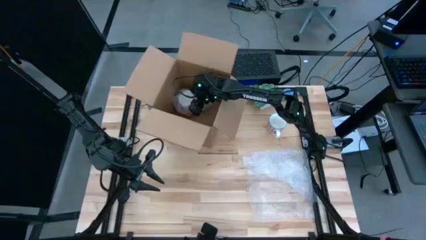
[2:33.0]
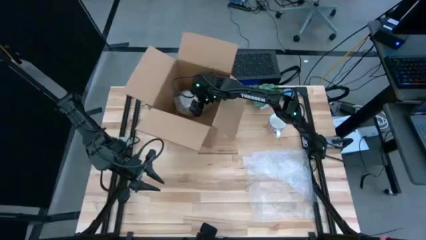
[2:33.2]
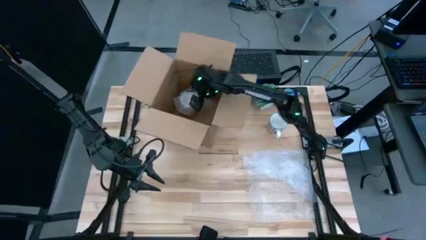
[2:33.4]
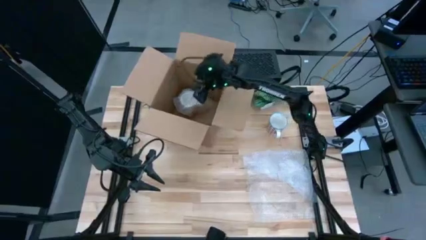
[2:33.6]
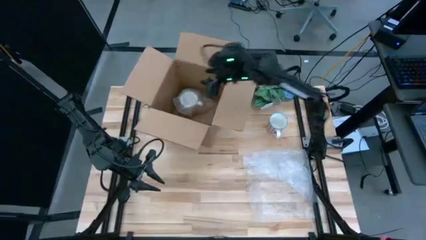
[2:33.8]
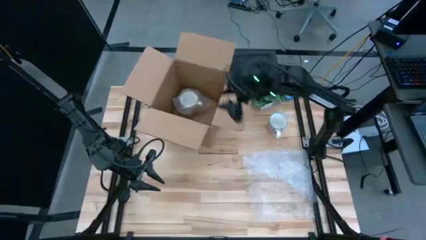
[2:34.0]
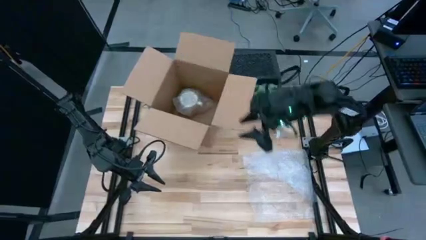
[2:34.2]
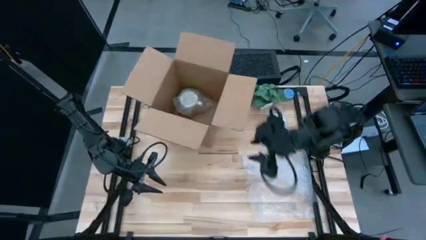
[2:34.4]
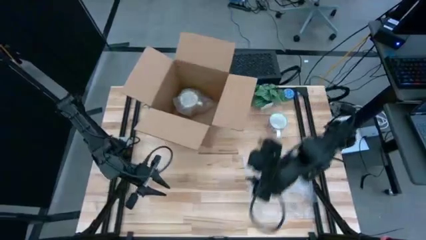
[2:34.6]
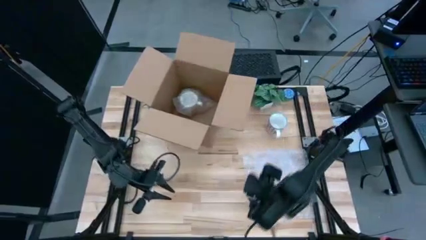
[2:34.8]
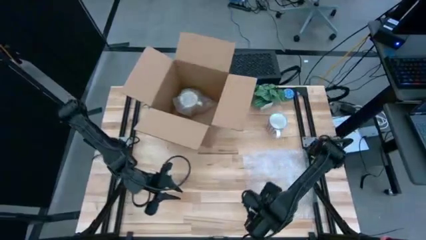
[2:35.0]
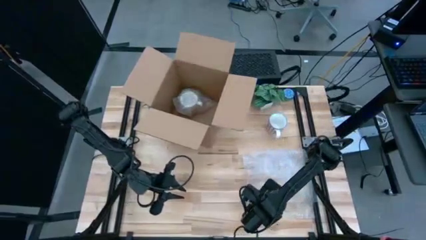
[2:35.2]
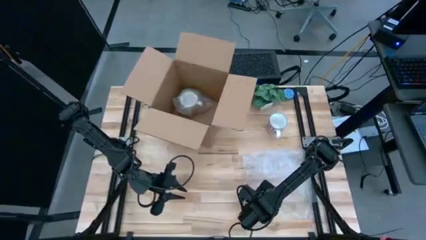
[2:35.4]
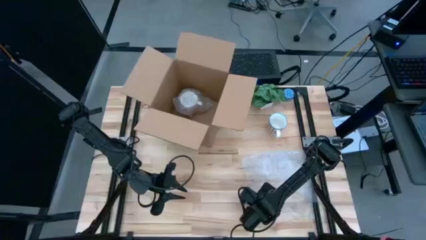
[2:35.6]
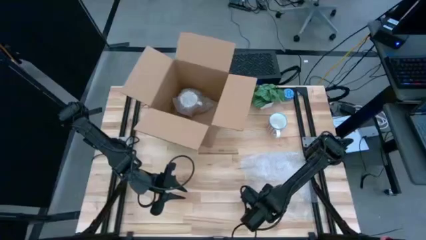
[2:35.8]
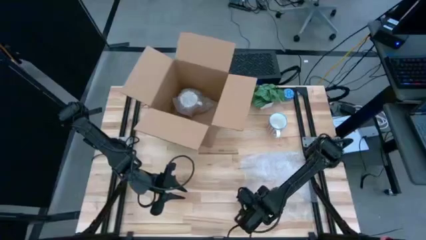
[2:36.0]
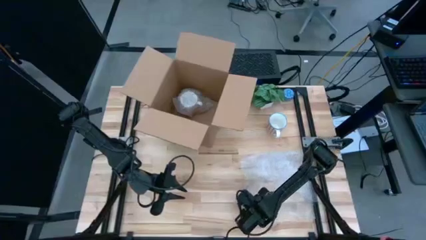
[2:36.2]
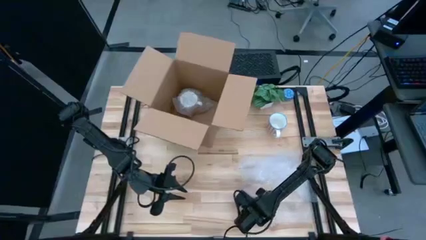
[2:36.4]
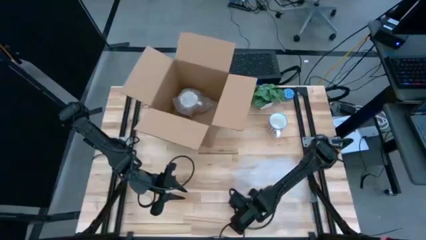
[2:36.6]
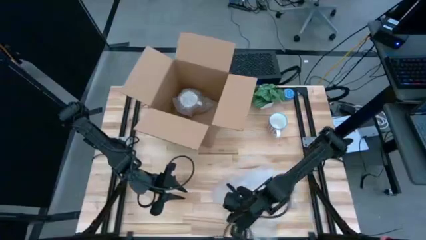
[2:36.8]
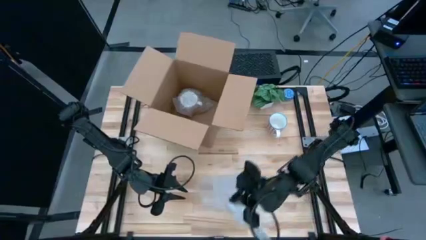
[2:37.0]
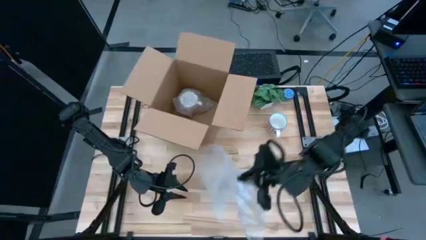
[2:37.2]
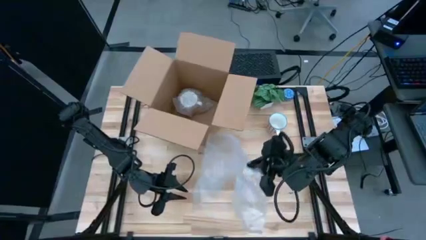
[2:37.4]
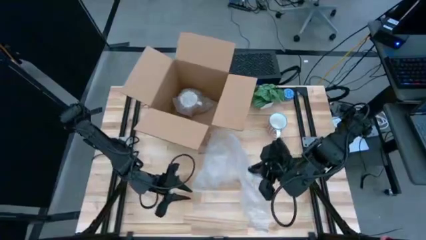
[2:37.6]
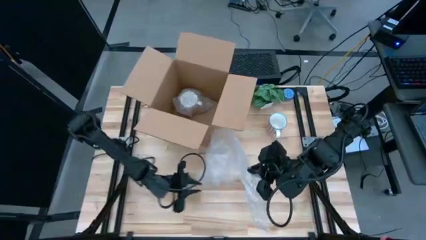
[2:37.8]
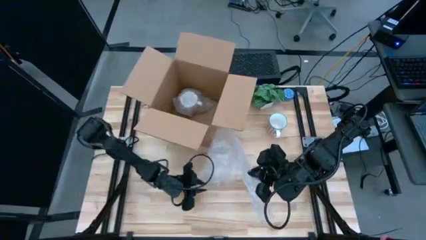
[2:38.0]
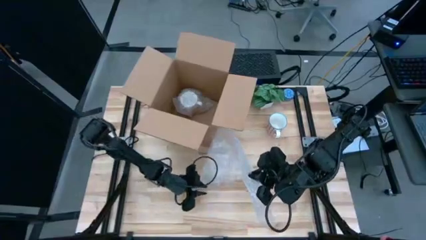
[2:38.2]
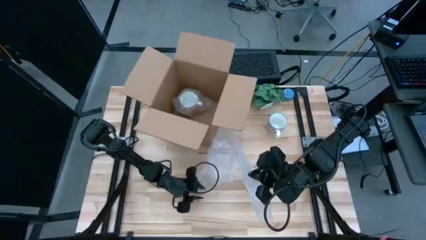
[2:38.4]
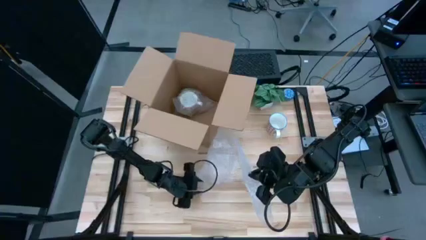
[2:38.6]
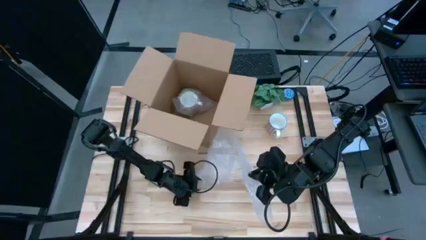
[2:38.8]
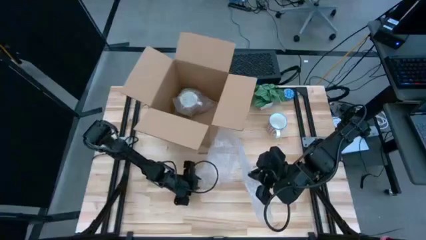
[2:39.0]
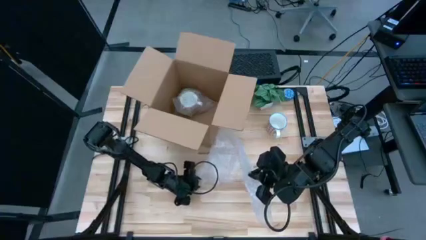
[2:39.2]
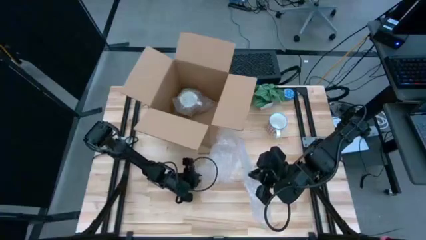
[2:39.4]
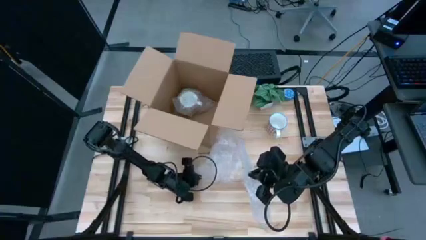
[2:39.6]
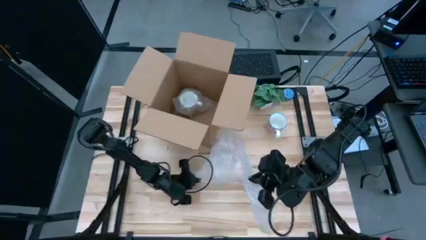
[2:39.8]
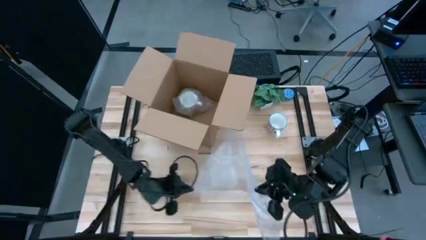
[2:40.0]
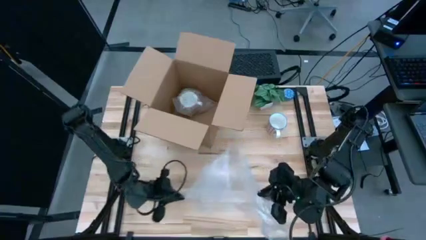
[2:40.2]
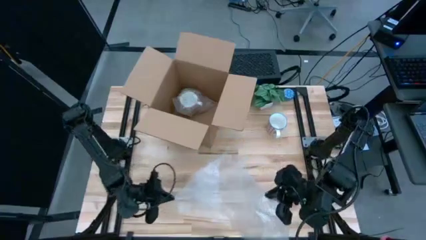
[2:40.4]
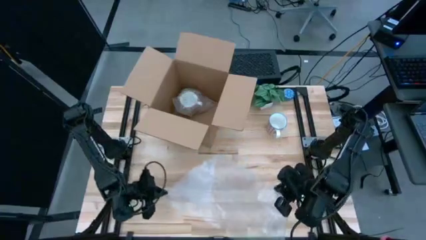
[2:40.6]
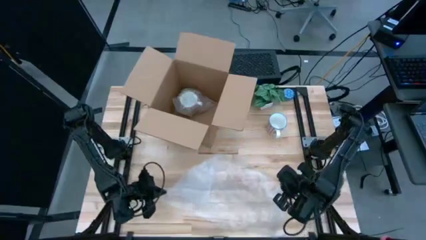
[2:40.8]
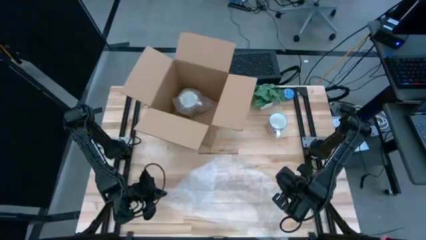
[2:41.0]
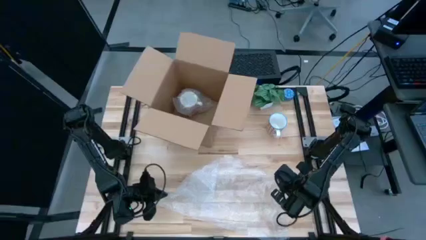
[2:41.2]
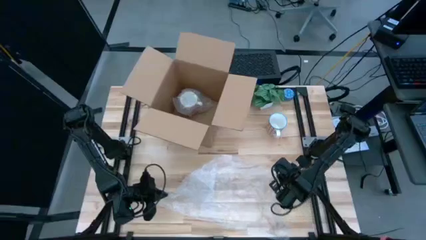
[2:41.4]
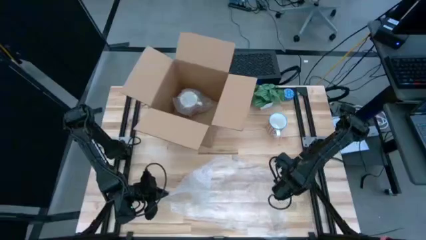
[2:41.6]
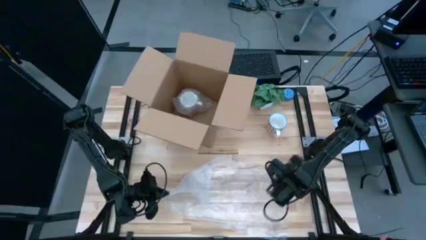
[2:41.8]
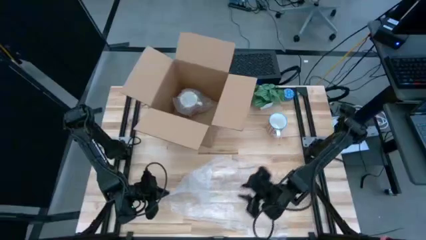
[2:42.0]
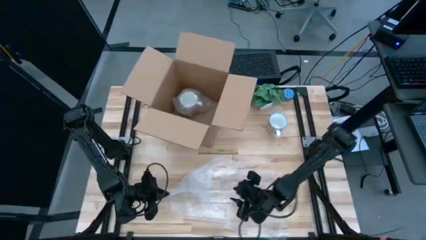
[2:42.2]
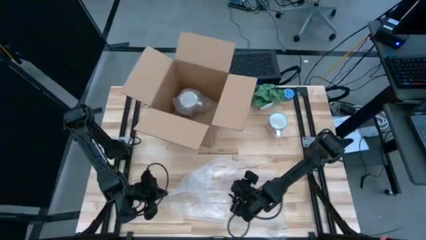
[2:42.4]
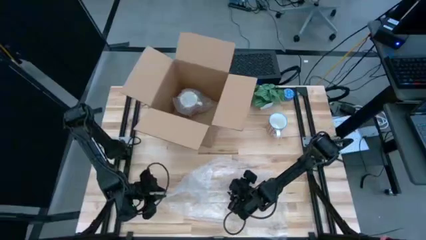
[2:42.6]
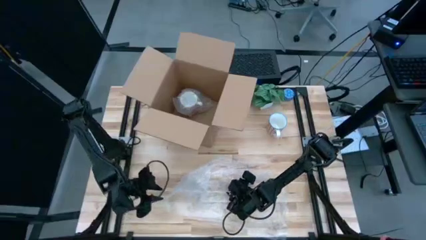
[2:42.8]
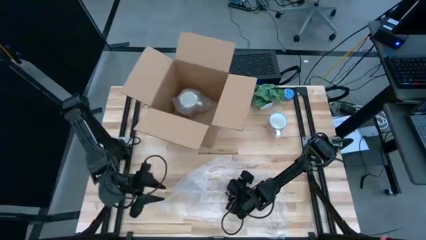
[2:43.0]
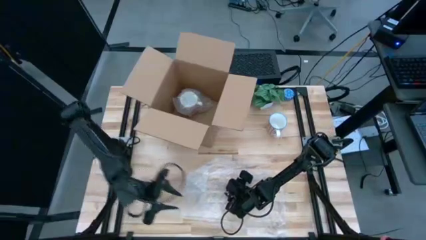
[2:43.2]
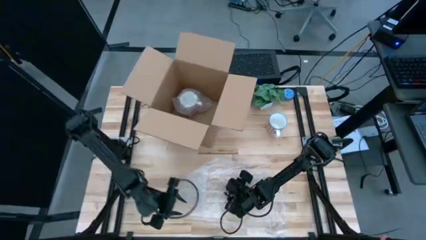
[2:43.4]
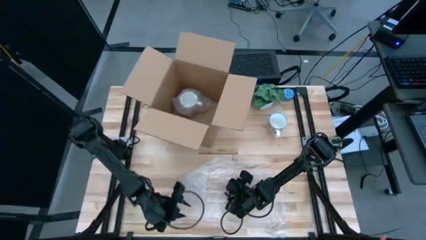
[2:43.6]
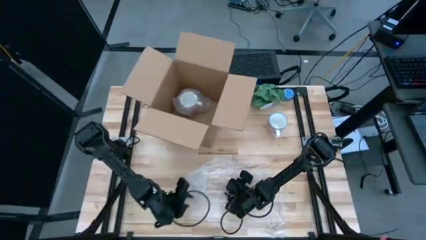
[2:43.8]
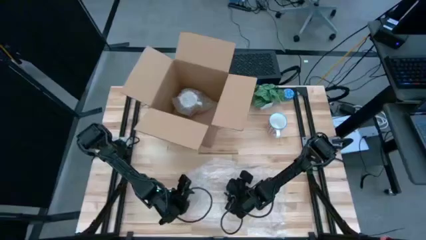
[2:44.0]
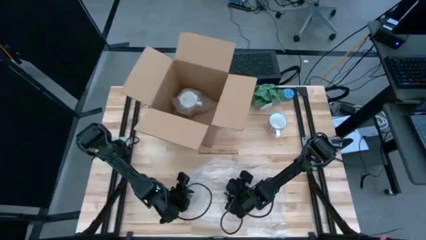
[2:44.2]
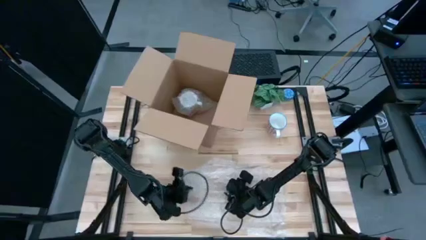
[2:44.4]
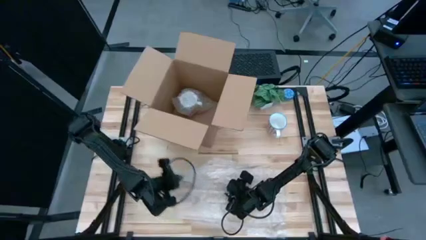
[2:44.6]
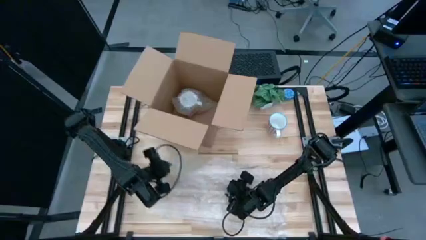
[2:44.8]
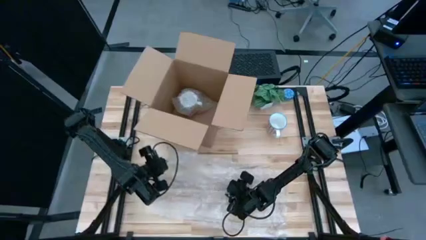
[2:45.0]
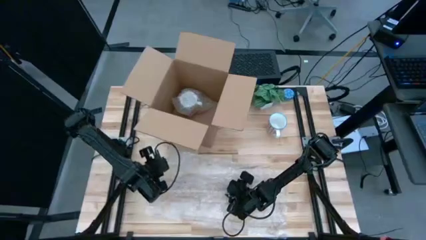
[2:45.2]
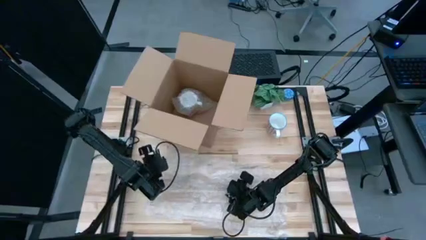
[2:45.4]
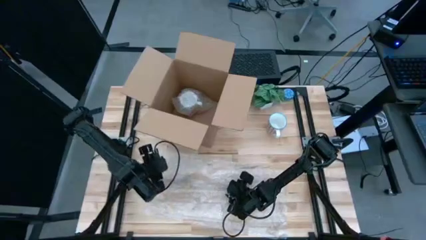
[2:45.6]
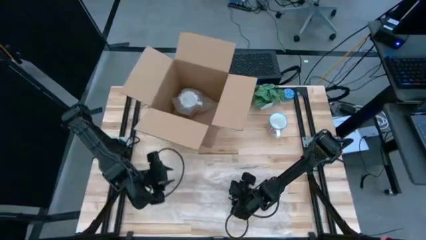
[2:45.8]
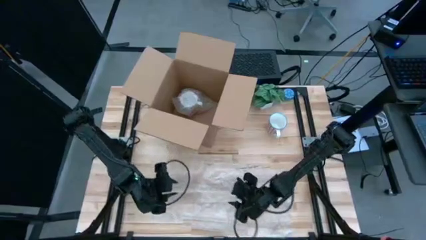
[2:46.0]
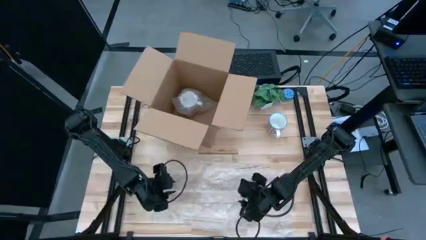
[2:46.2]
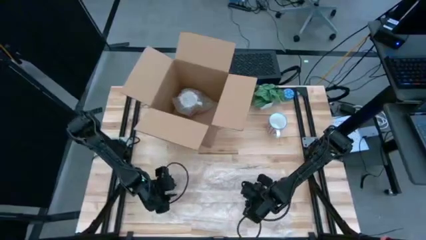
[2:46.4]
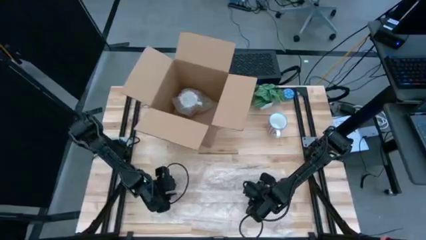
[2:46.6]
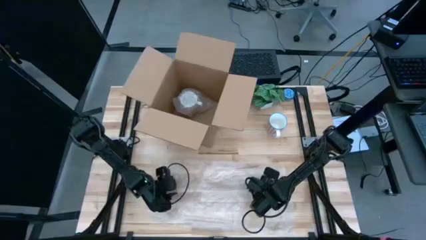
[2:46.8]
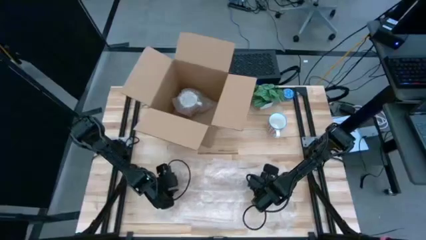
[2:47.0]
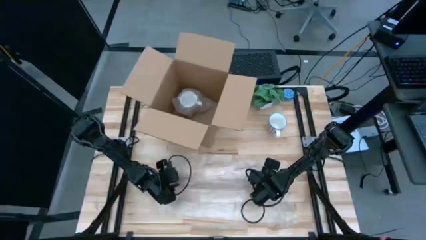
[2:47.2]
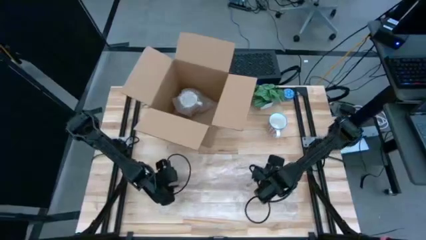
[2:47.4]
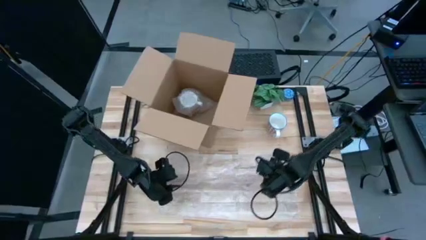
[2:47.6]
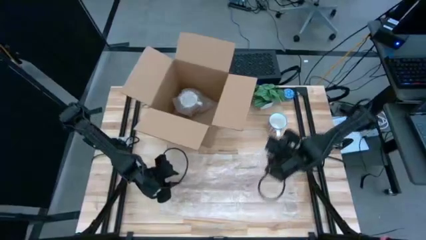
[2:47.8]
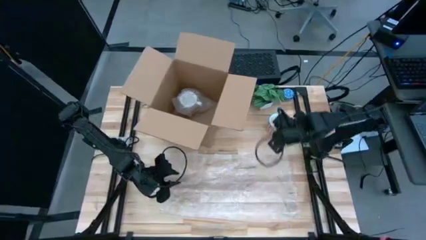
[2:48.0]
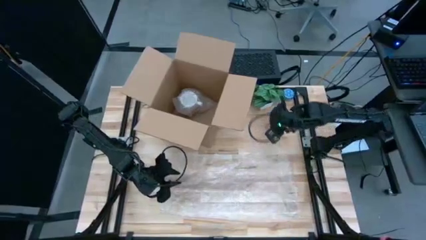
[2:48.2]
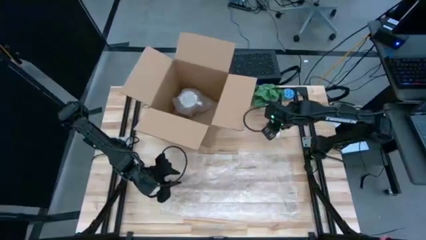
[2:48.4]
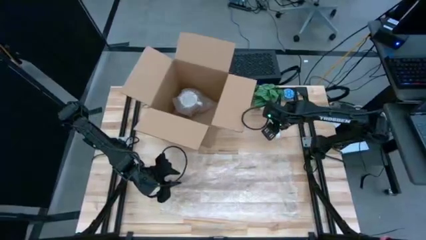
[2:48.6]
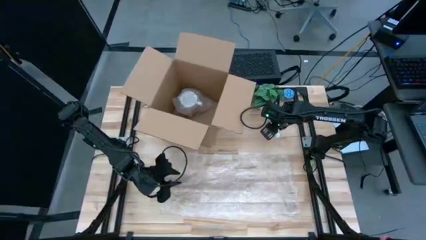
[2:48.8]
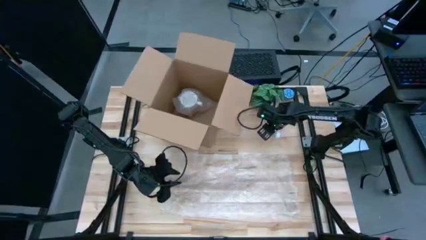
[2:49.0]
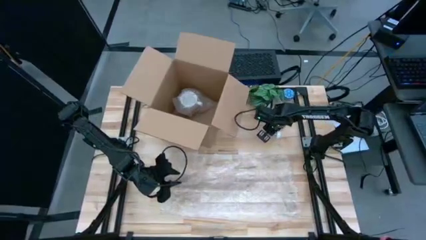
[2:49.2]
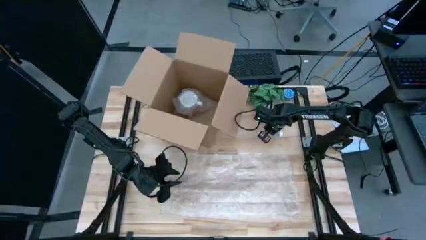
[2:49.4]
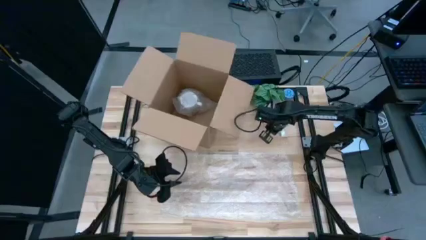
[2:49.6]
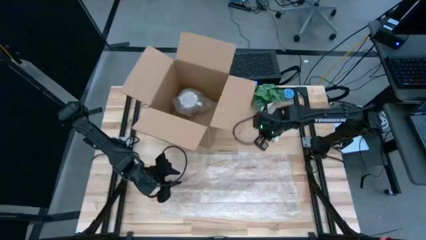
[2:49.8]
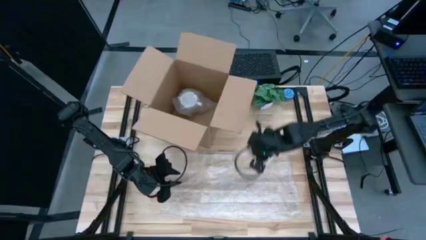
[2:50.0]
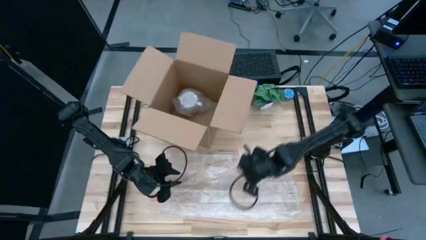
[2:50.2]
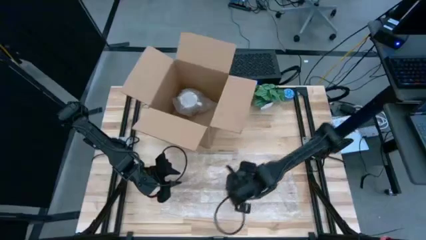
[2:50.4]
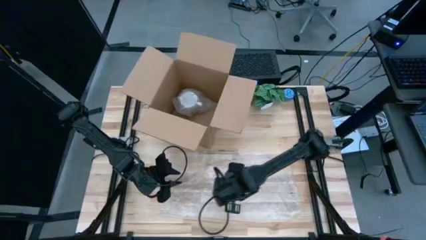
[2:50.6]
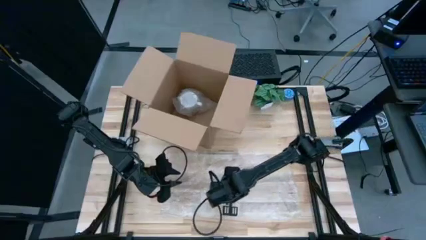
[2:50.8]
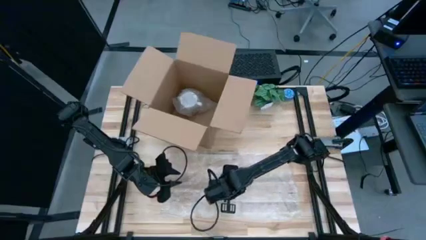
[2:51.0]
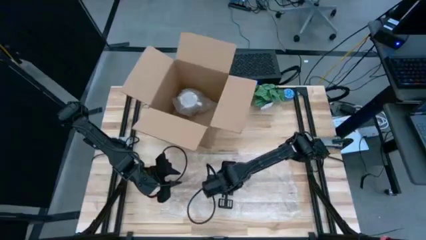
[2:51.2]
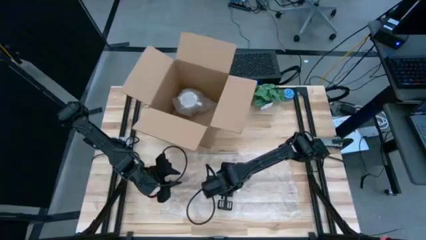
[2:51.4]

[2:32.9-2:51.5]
Task: wrap mug
Wrap the red mug with bubble wrap
